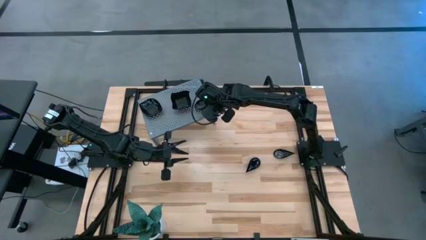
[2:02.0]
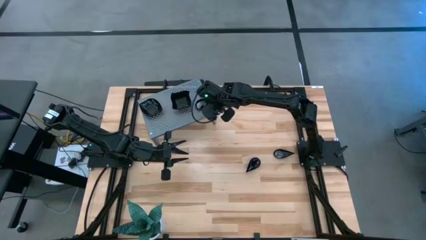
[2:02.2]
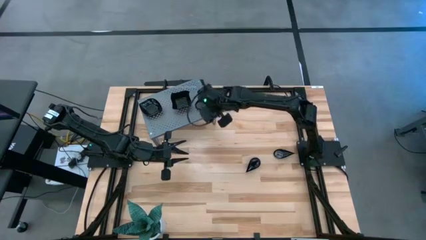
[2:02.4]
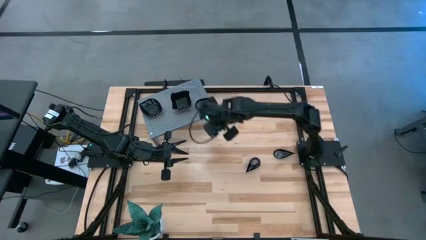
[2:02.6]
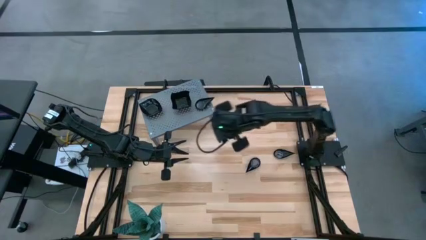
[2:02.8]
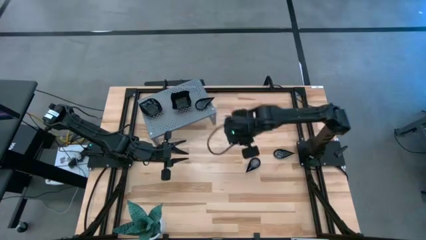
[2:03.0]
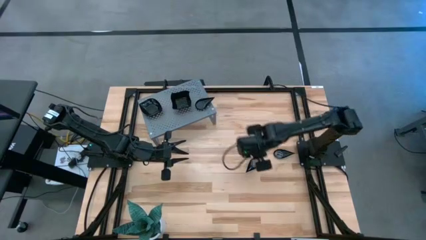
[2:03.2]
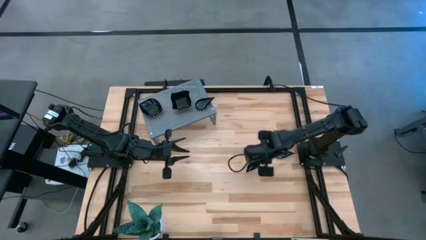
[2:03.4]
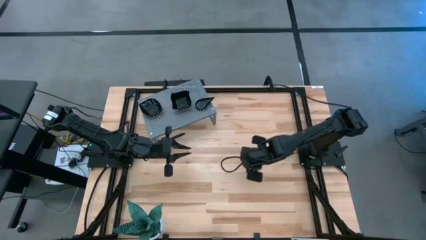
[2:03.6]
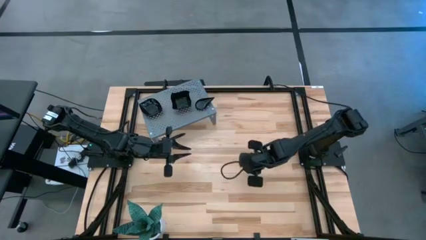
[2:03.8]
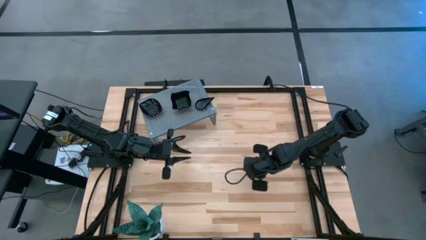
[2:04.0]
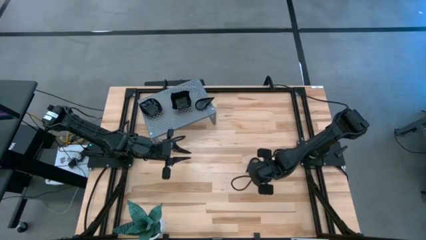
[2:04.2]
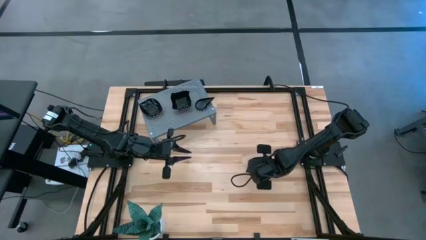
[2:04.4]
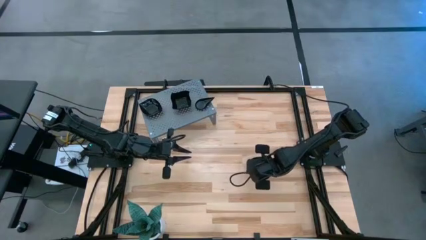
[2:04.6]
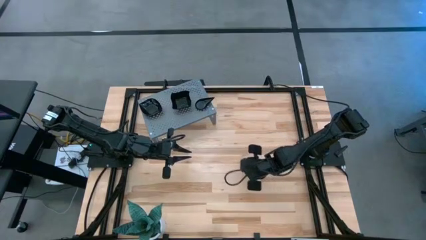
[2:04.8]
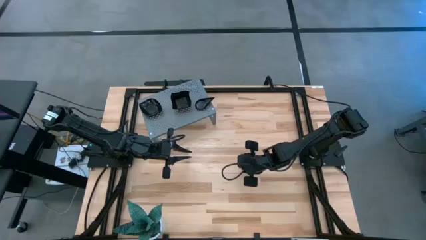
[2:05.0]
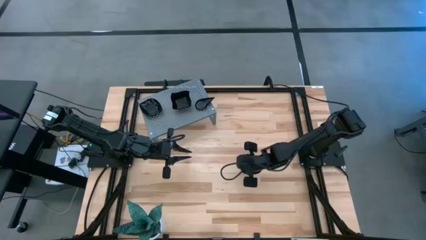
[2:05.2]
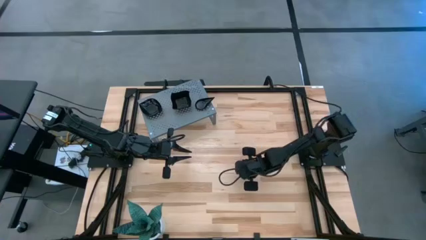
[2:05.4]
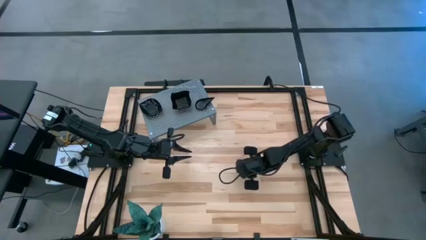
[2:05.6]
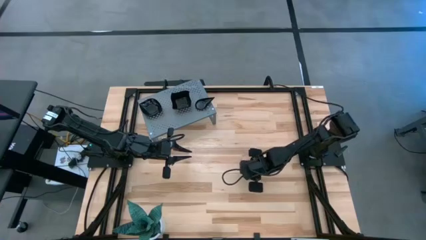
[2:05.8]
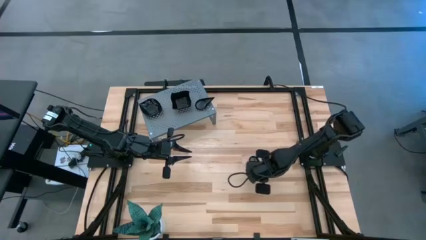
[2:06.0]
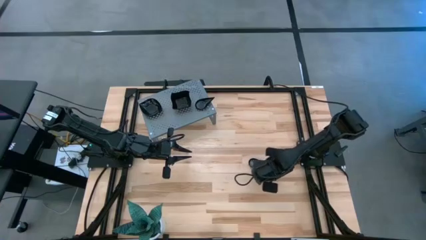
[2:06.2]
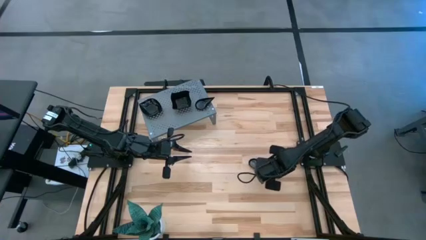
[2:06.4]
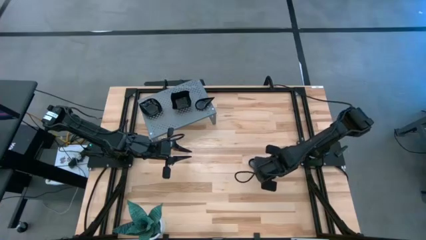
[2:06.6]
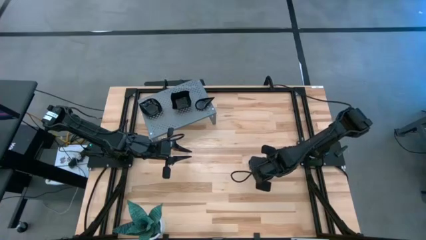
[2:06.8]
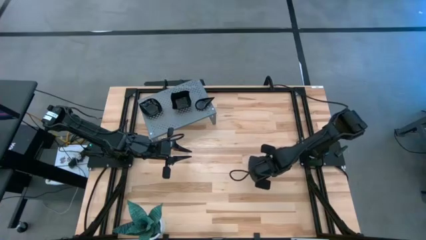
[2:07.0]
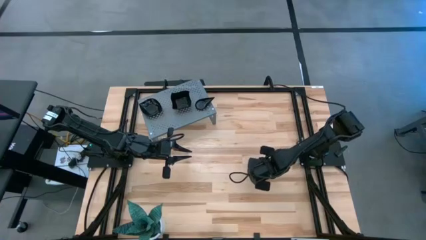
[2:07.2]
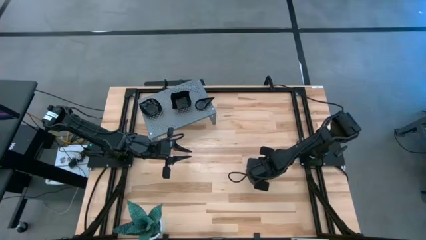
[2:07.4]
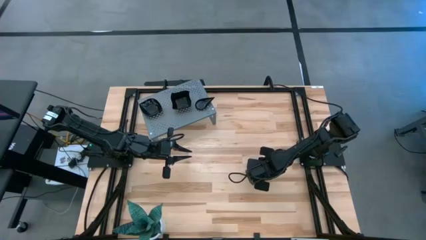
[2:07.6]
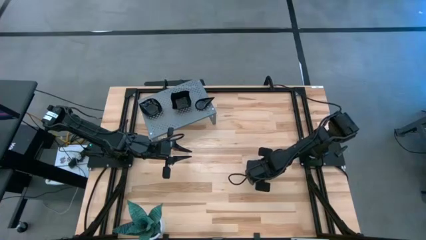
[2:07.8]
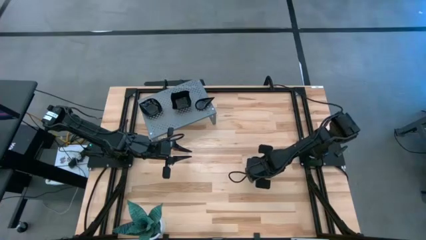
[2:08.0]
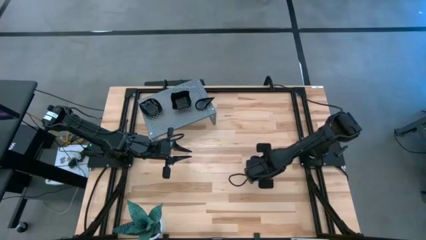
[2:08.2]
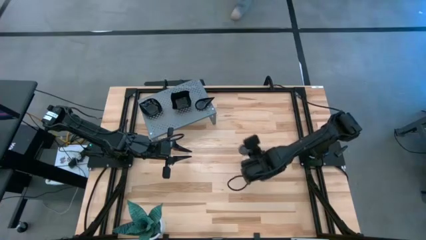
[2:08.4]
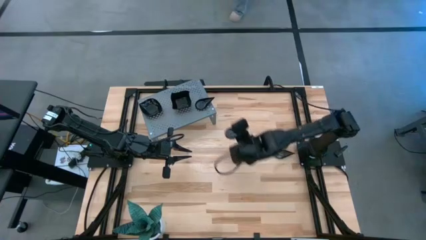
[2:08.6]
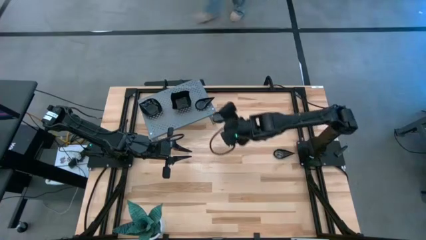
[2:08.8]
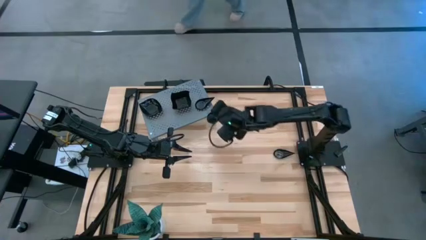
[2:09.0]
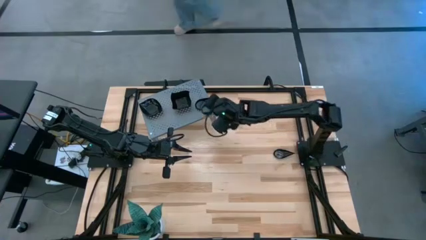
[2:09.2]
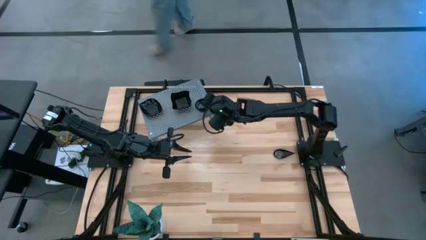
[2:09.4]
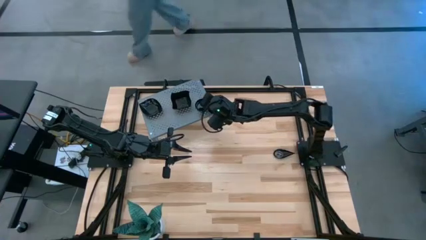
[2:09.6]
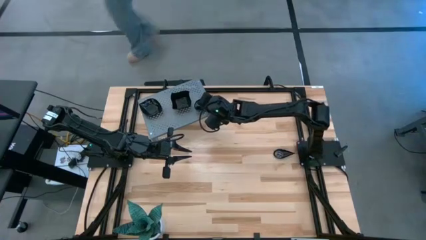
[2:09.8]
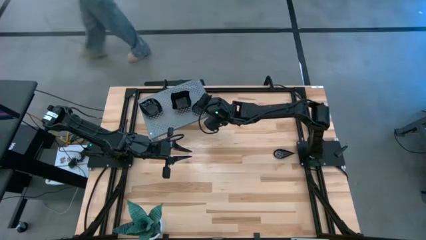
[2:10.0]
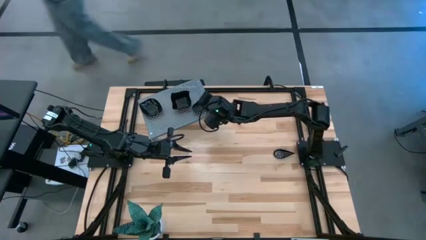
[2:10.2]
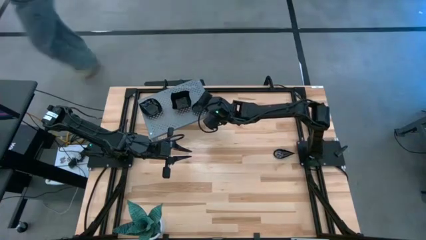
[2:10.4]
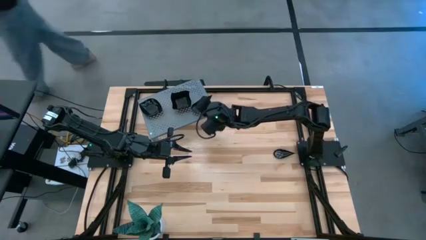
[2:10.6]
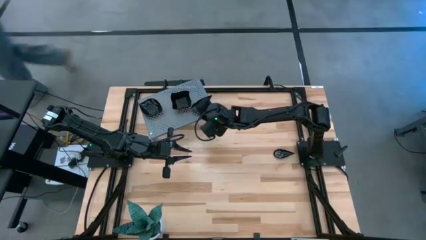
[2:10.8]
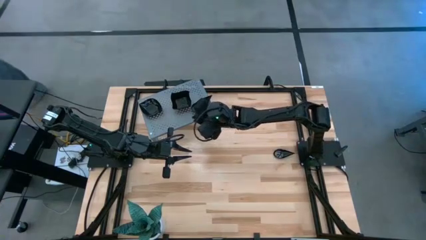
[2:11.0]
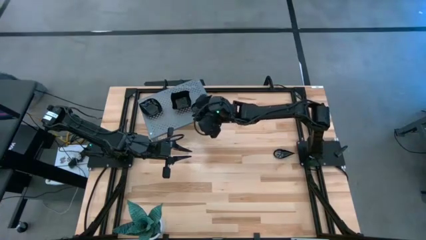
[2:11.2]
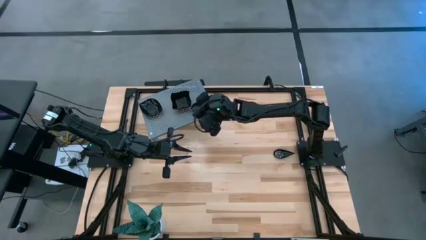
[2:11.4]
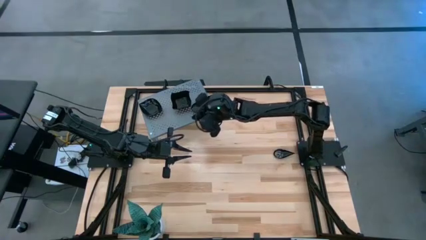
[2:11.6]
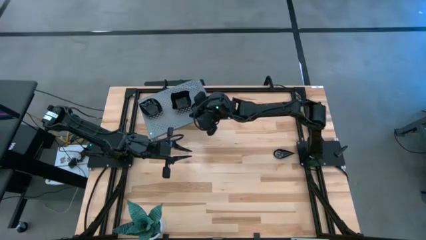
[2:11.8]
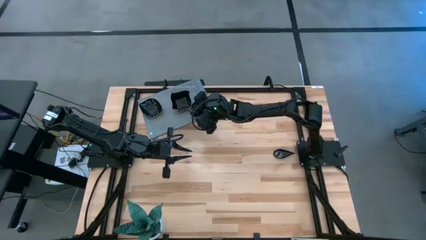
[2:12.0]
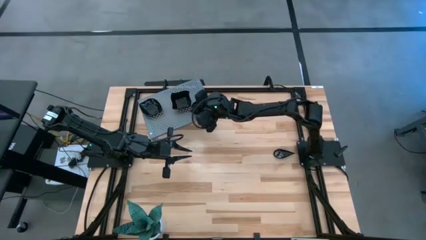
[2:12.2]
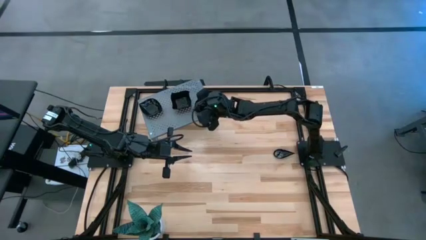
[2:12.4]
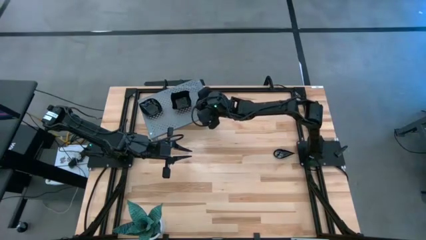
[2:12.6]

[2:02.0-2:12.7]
Task: Pick & Place Mini shaped plates
Stack the black drop-shaped plate on top of the black drop-shaped plate on the shelf

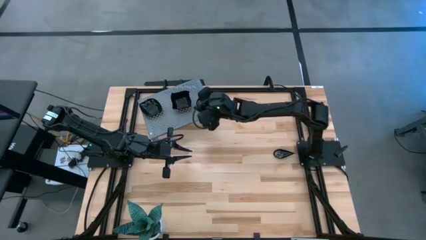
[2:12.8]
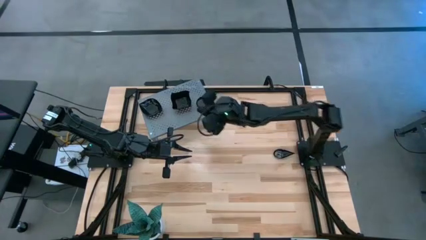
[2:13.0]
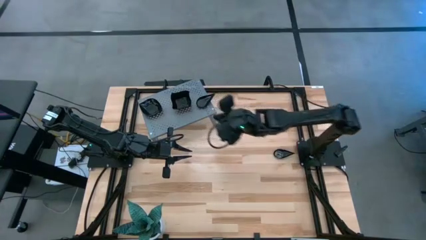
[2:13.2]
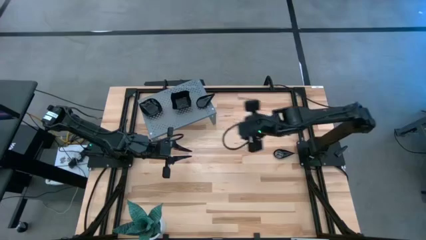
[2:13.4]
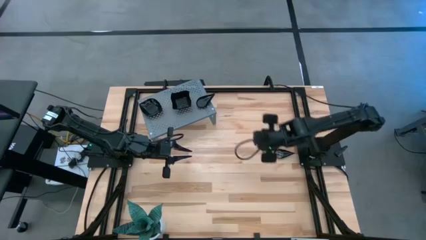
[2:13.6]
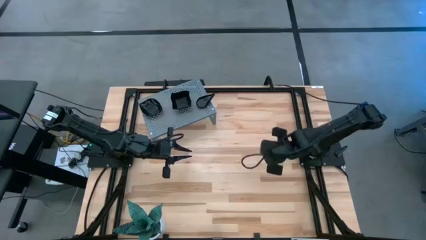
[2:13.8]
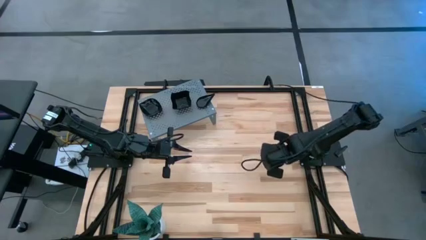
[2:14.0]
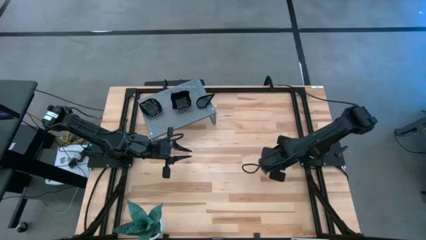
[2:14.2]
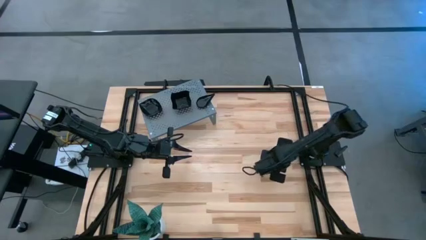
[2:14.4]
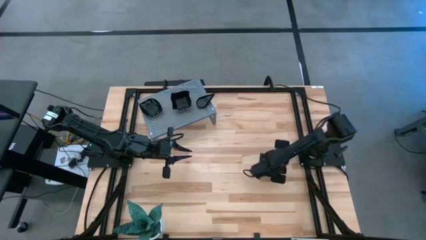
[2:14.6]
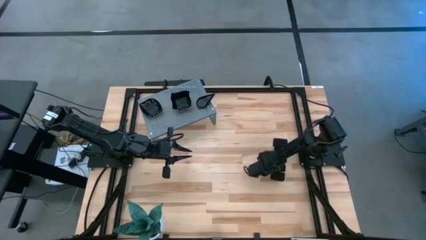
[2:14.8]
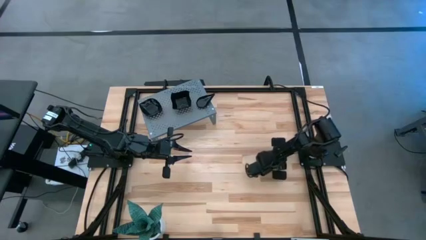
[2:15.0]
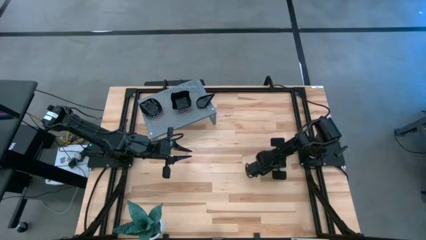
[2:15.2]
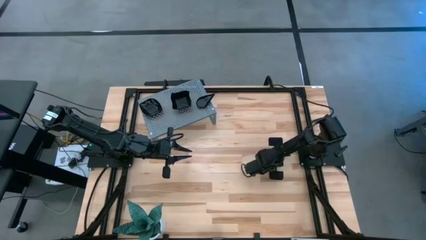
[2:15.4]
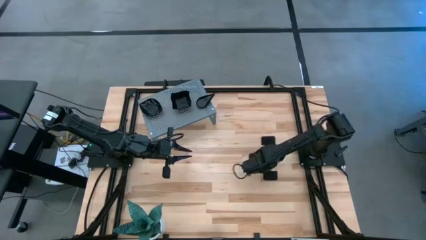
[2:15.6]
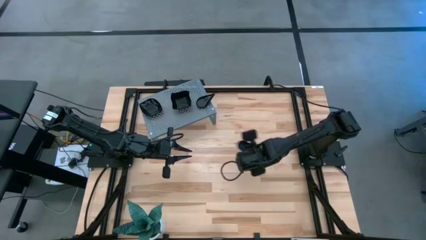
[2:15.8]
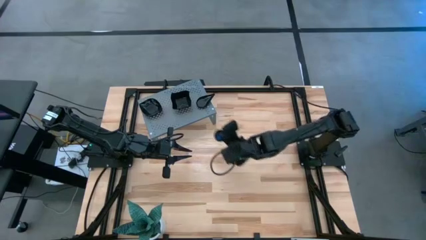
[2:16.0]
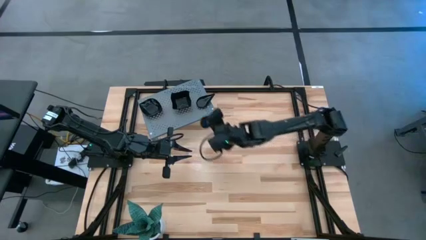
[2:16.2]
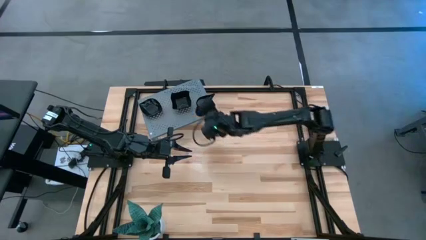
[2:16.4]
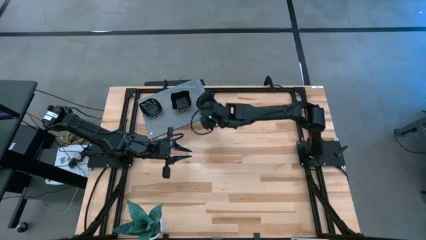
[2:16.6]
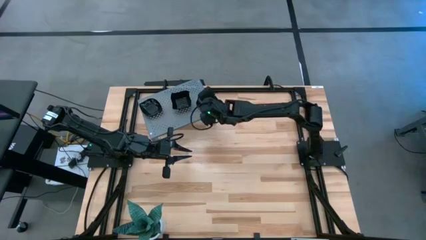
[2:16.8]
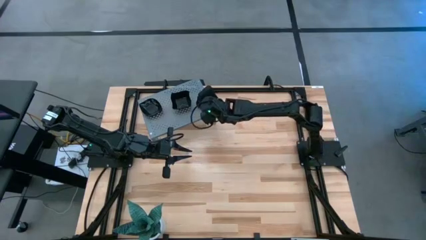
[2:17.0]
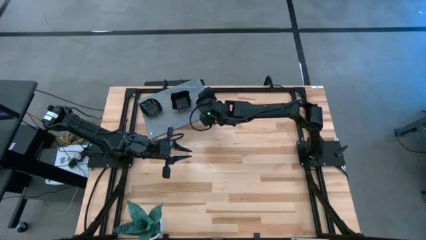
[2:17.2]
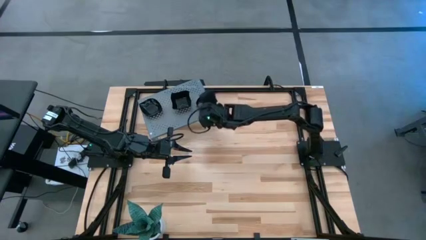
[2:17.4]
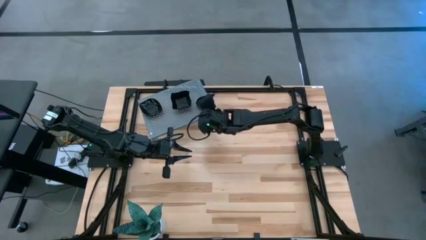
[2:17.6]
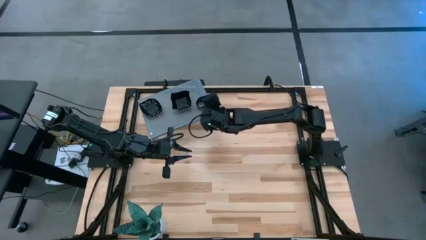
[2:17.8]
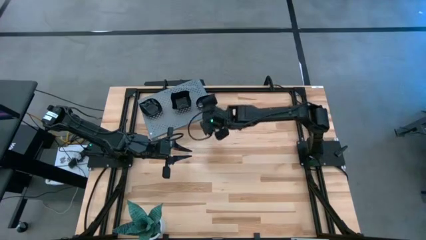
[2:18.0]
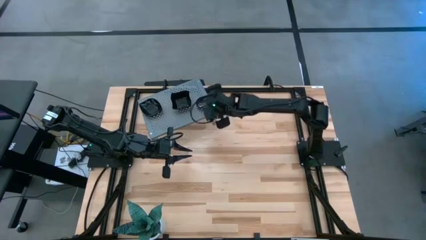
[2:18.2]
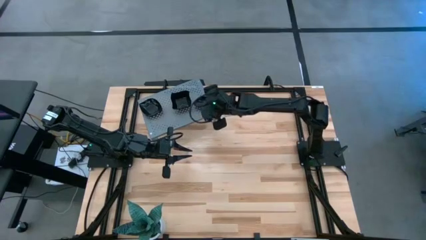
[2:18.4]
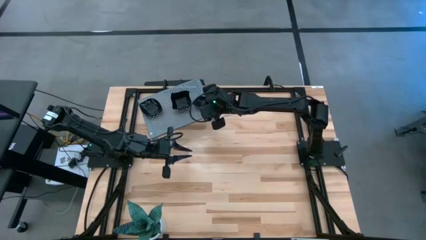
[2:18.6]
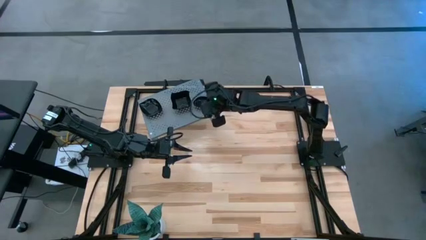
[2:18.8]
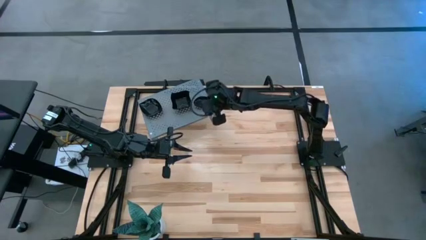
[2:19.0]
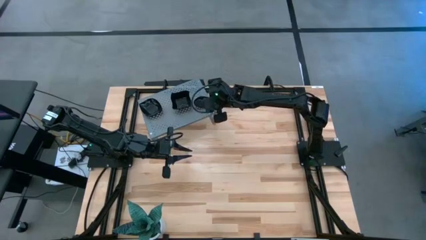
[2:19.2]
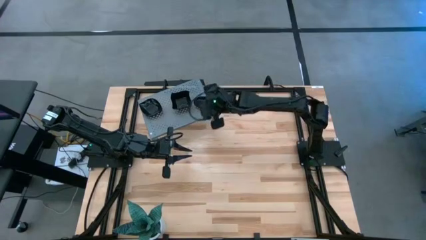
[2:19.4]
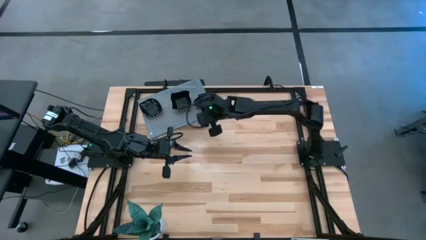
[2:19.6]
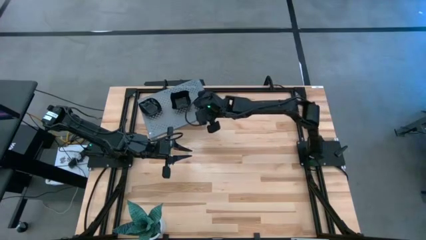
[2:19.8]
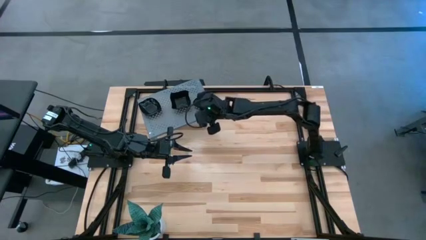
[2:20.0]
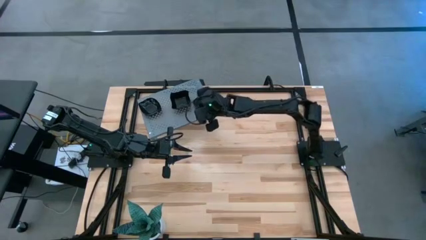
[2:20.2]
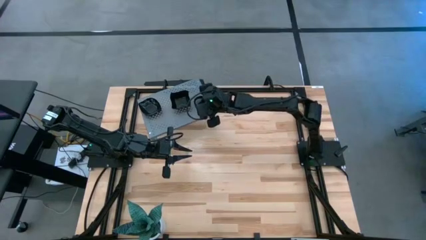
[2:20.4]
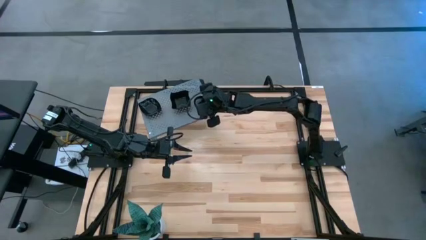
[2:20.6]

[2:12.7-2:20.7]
Stack the black drop-shaped plate on top of the black drop-shaped plate on the shelf
